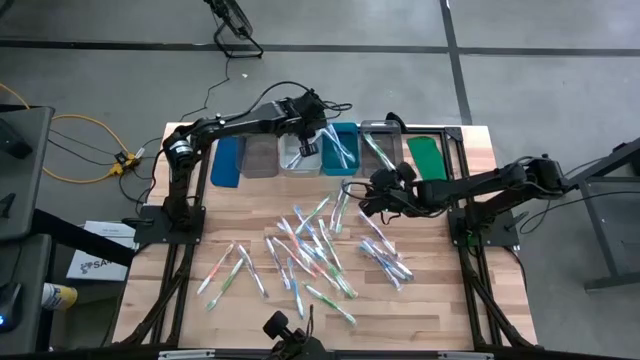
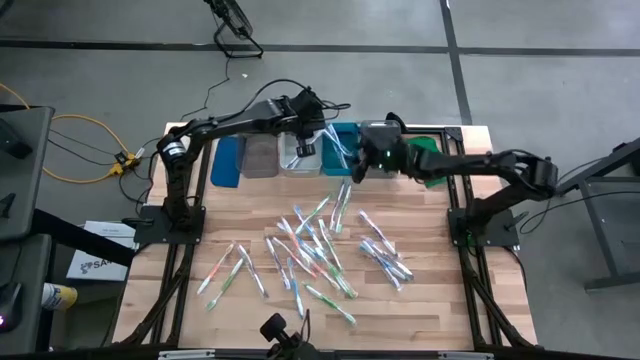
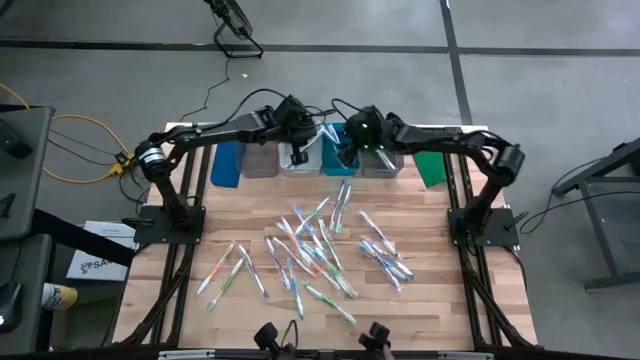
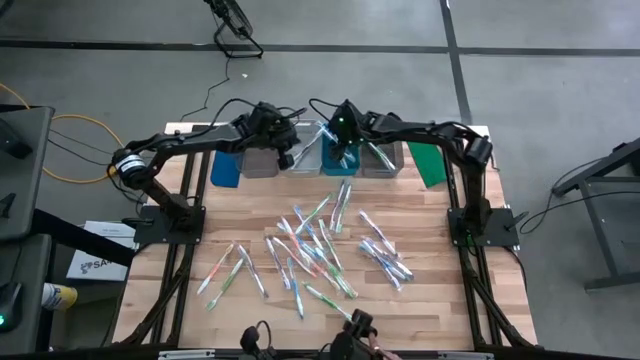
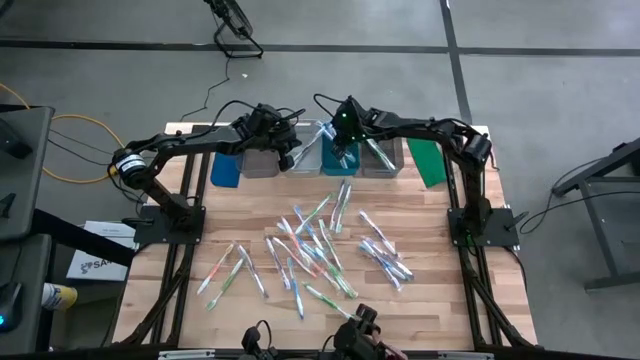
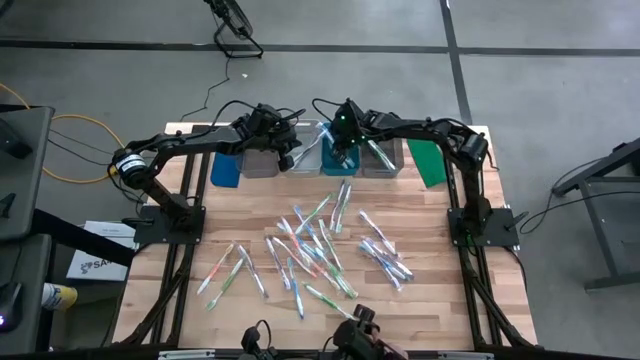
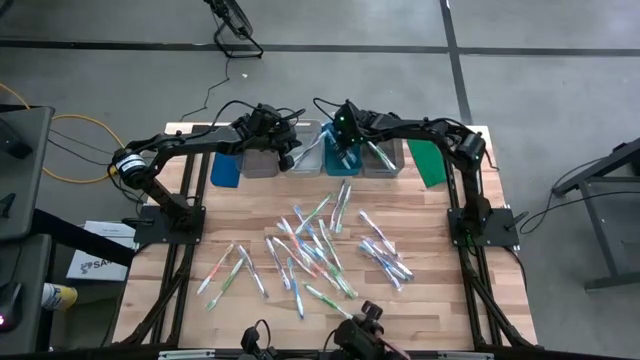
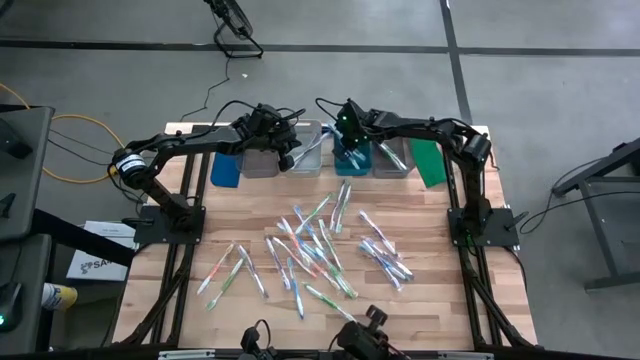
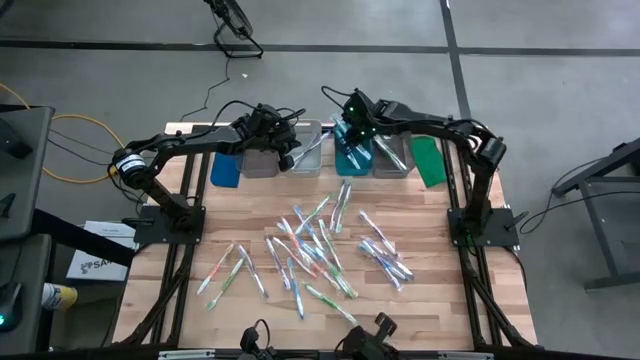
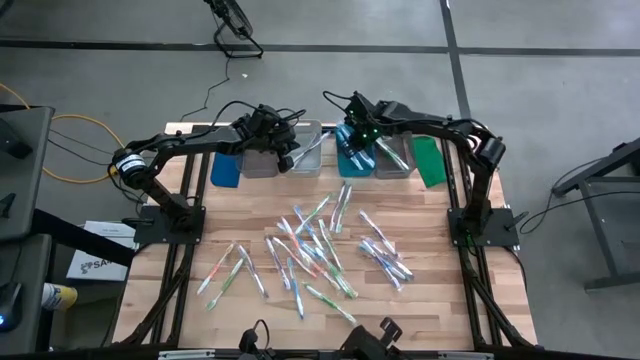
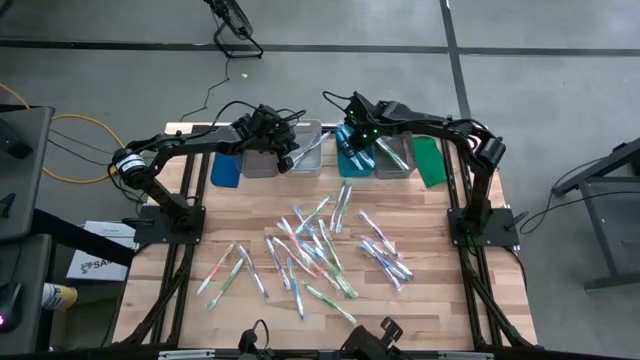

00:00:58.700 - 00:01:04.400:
Task: Pick & Place Toothbrushes
Adjust the blue toothbrushes

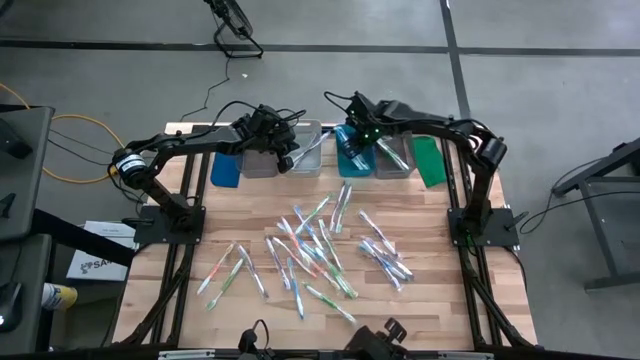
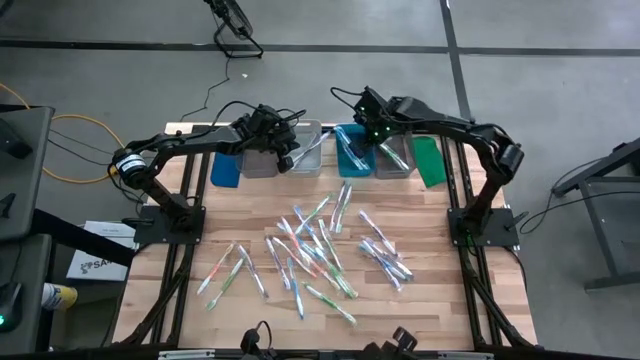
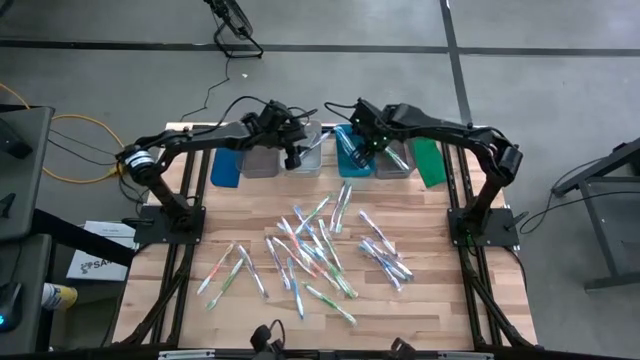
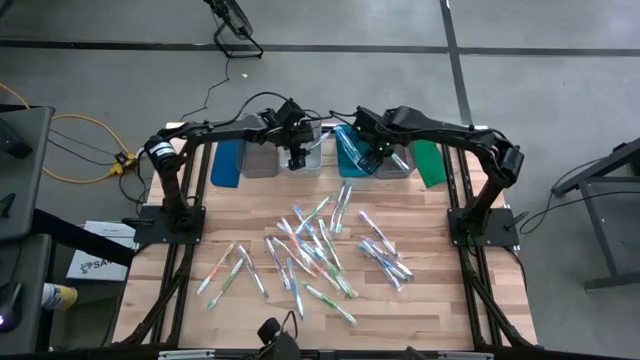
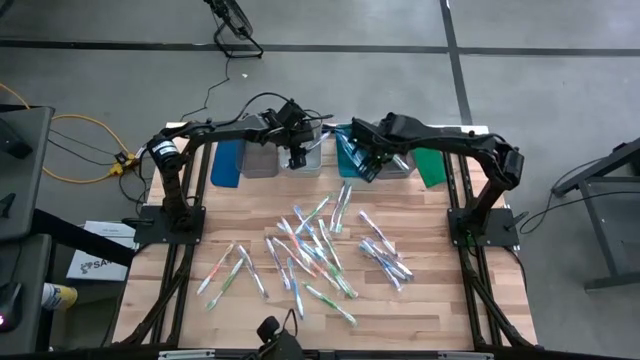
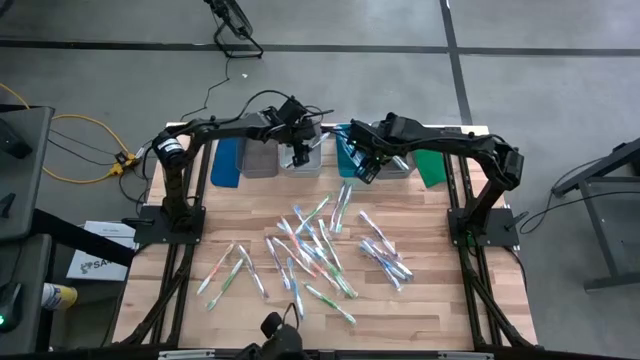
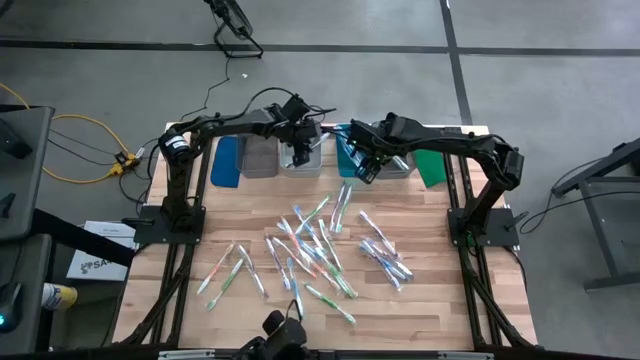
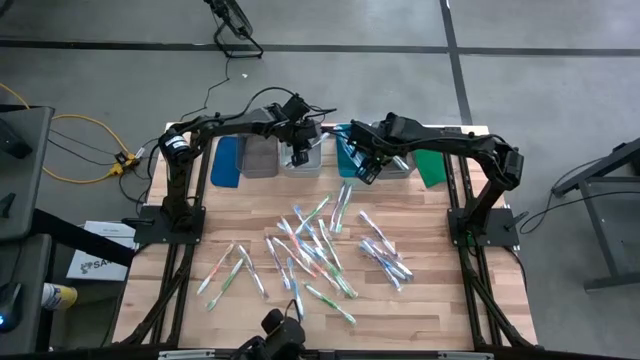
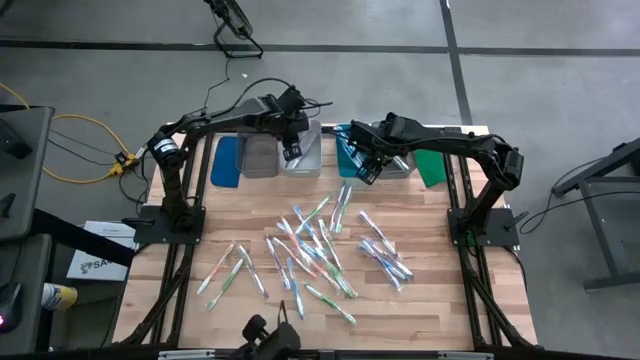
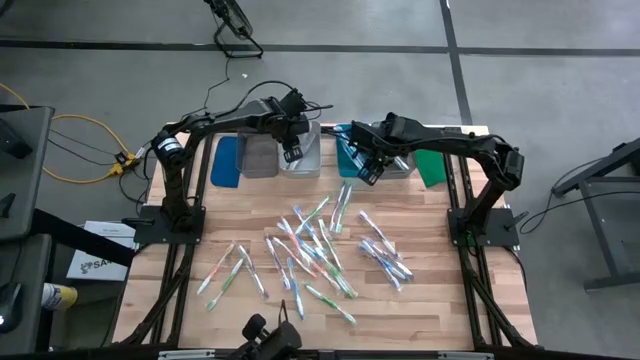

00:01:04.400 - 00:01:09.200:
Adjust the violet toothbrush

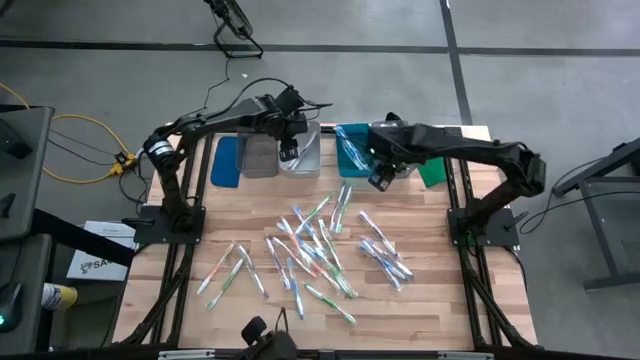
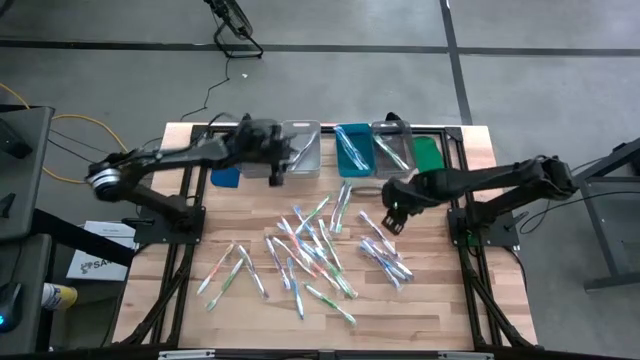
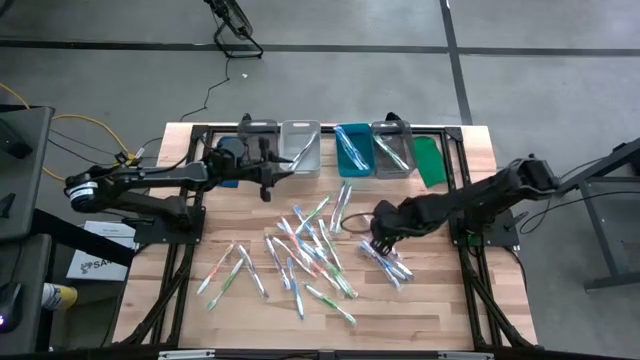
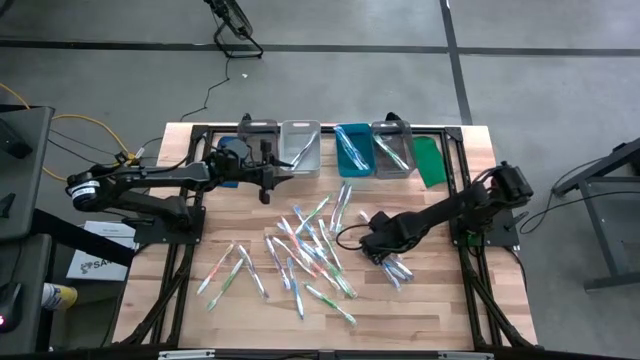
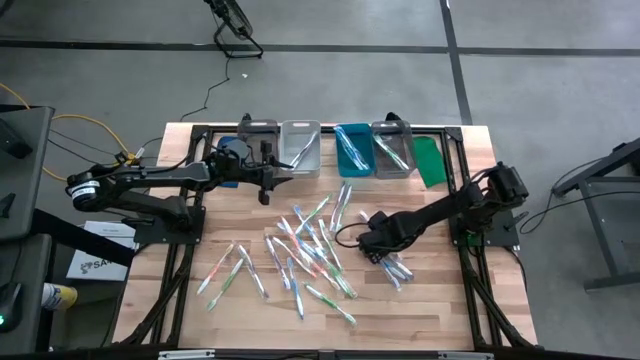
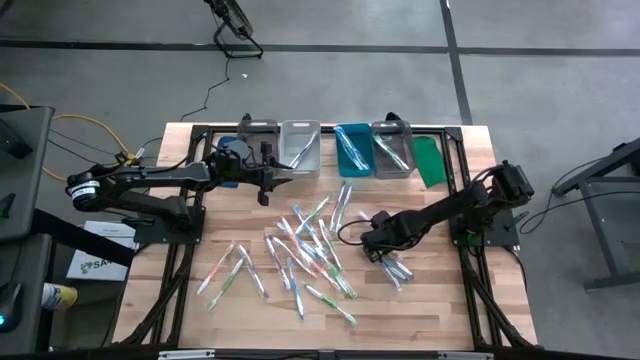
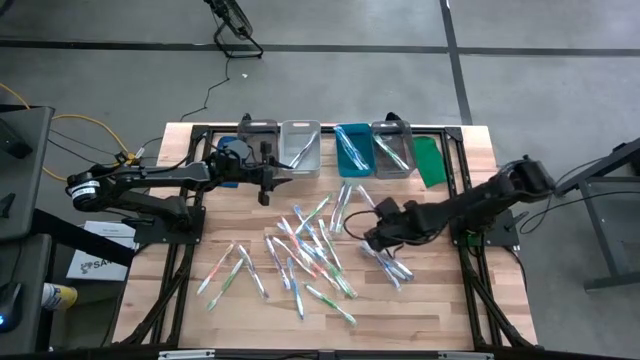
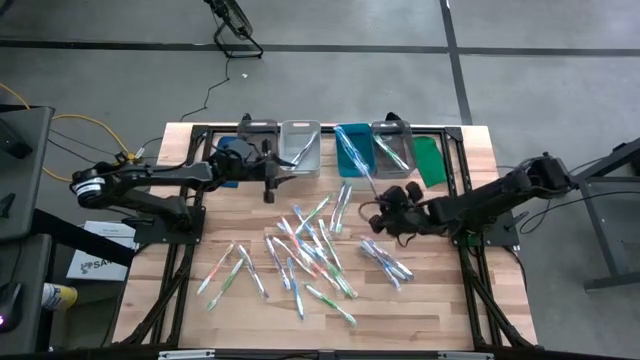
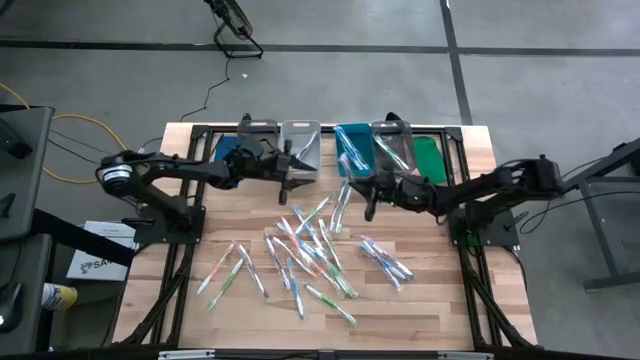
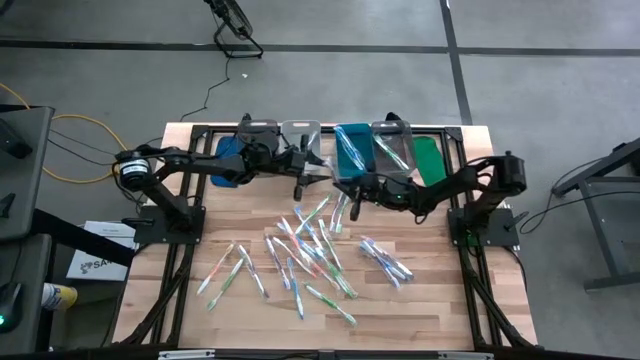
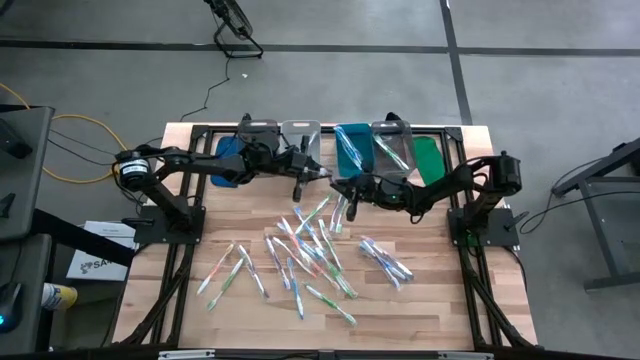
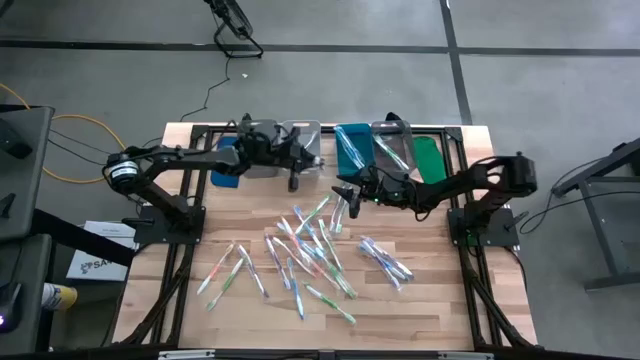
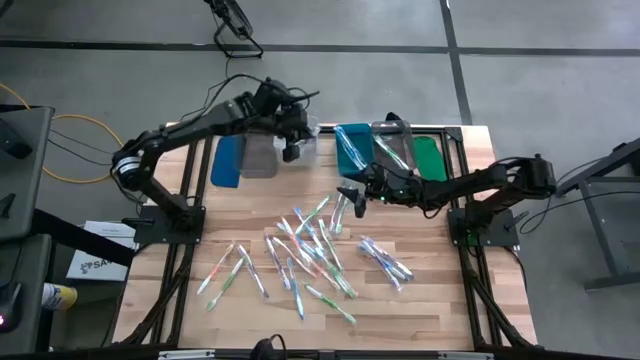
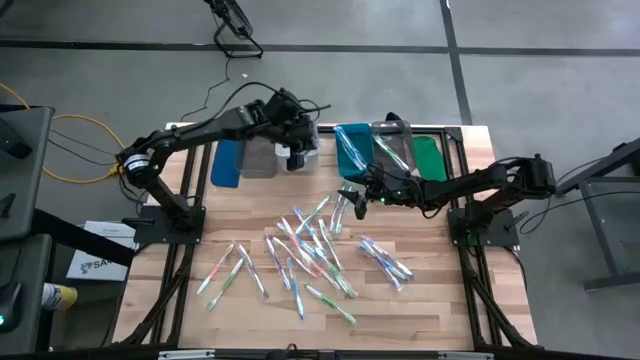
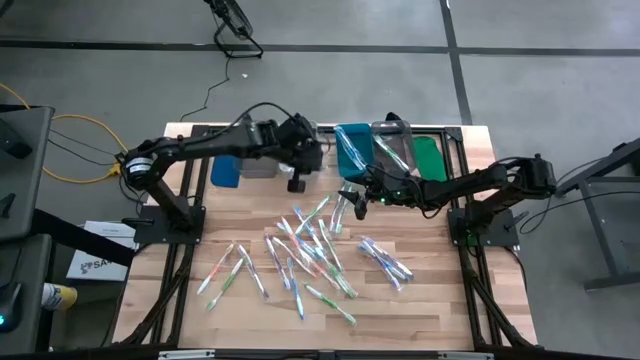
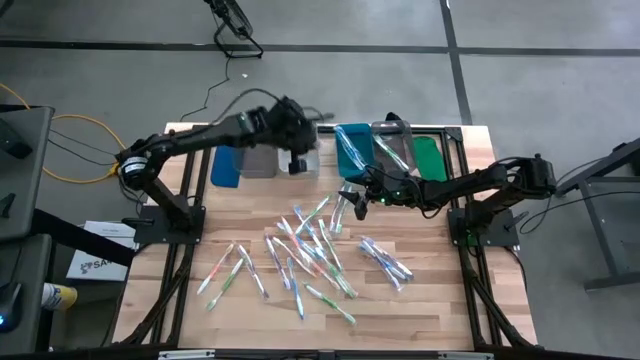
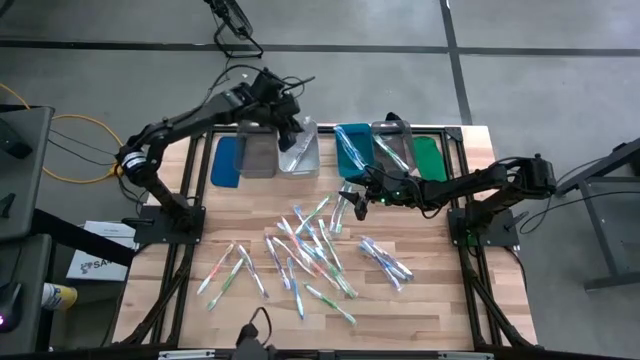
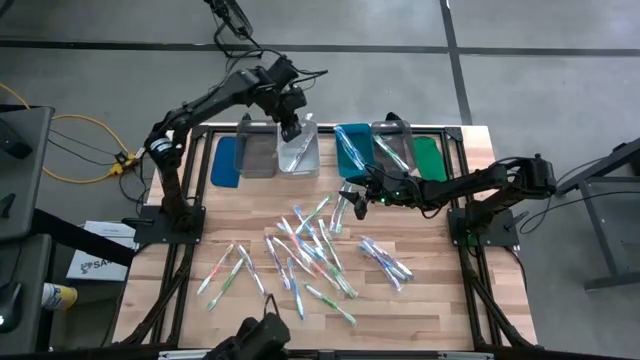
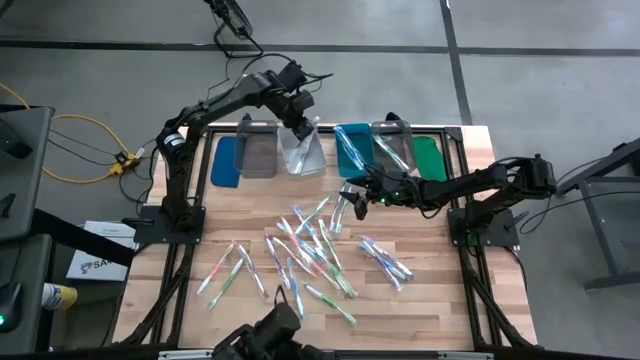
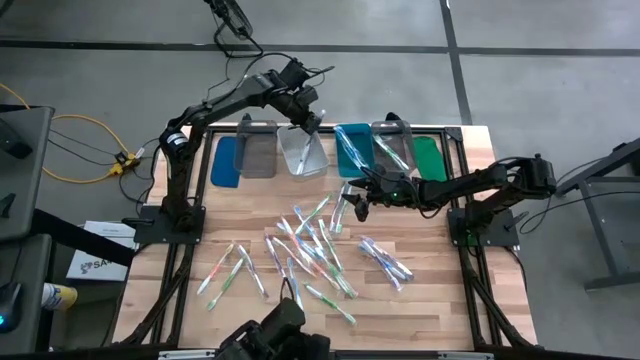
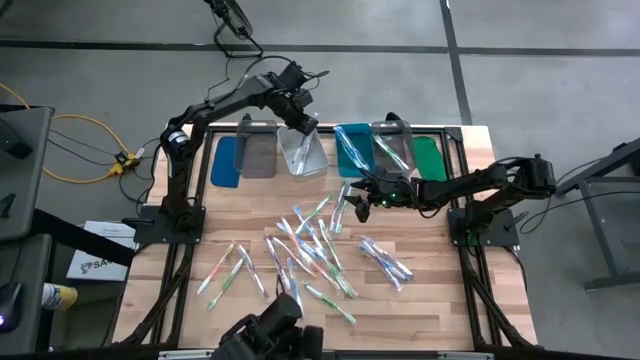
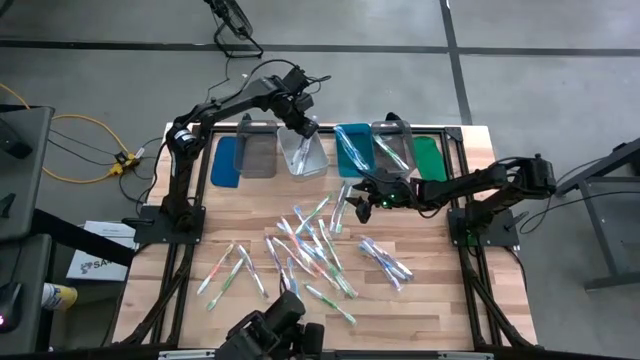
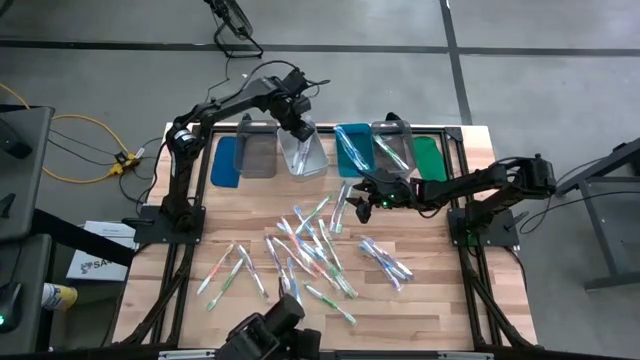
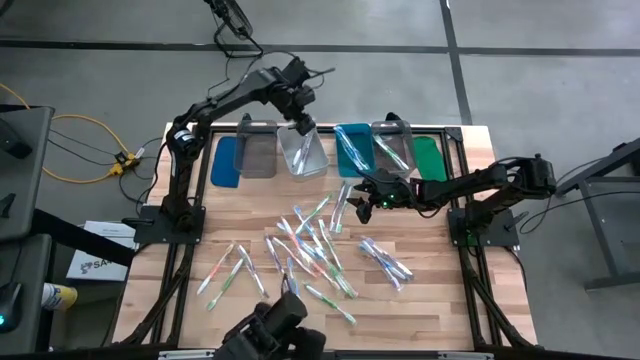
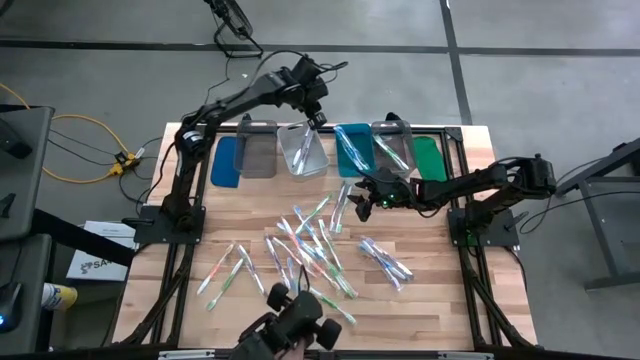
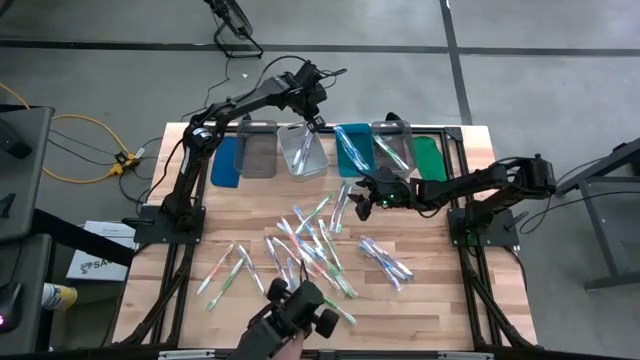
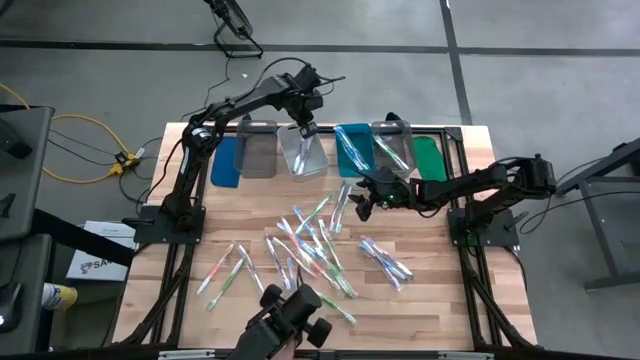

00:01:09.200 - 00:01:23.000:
Put the violet toothbrush into the gray bin
